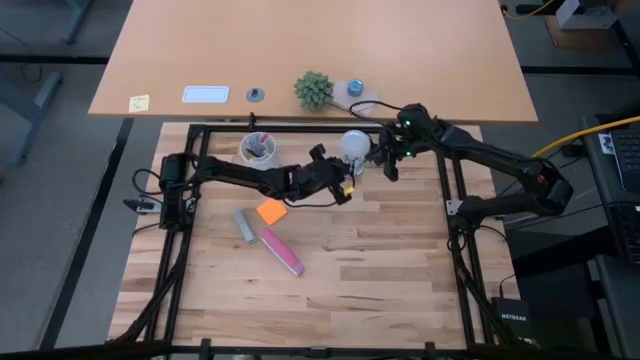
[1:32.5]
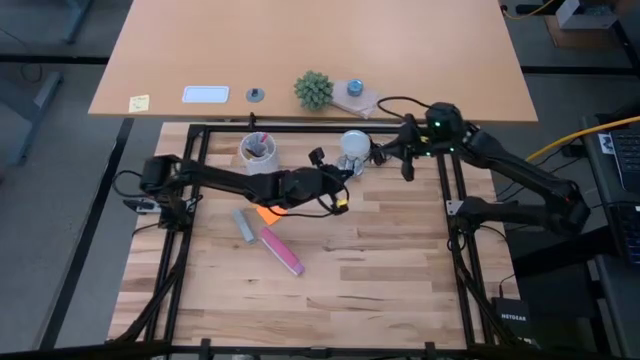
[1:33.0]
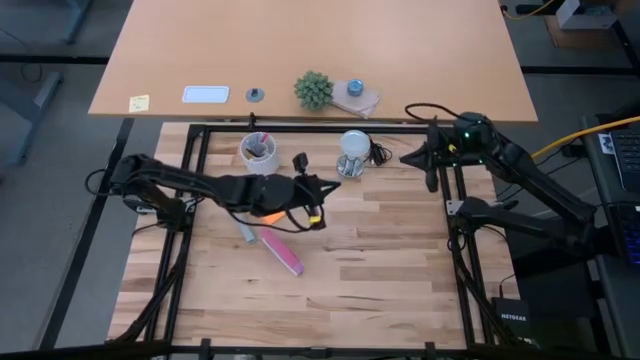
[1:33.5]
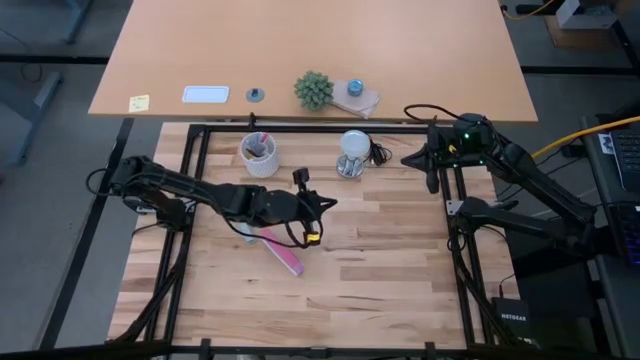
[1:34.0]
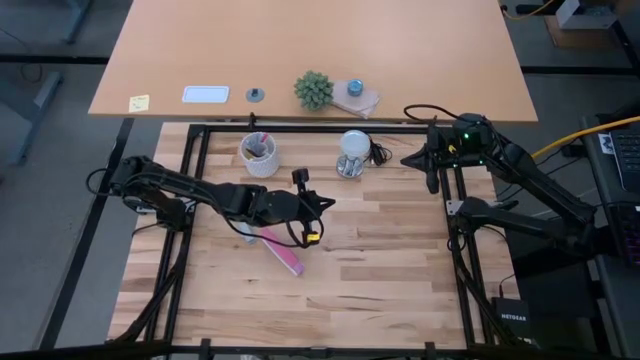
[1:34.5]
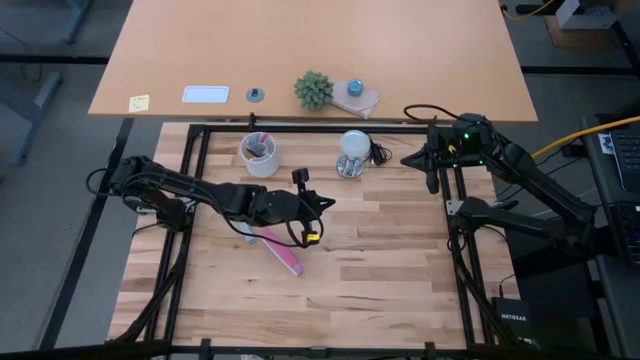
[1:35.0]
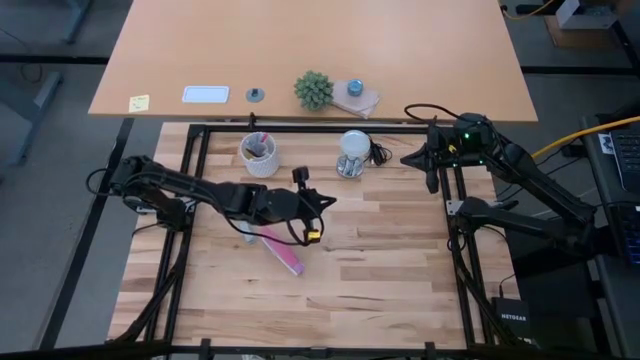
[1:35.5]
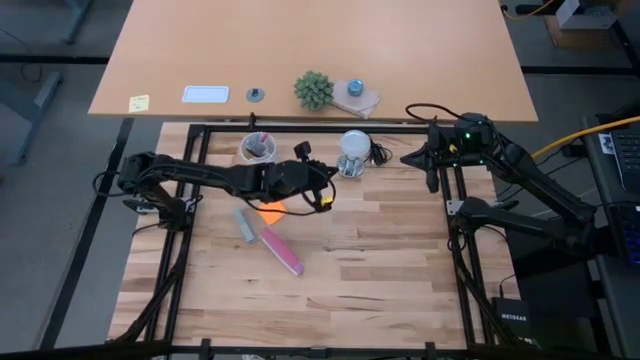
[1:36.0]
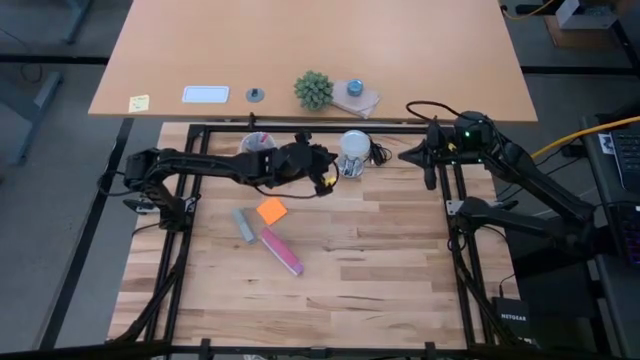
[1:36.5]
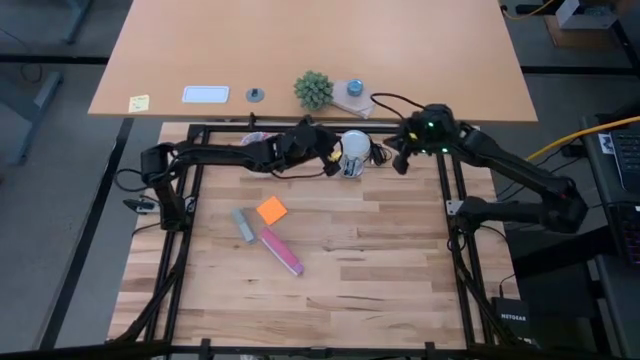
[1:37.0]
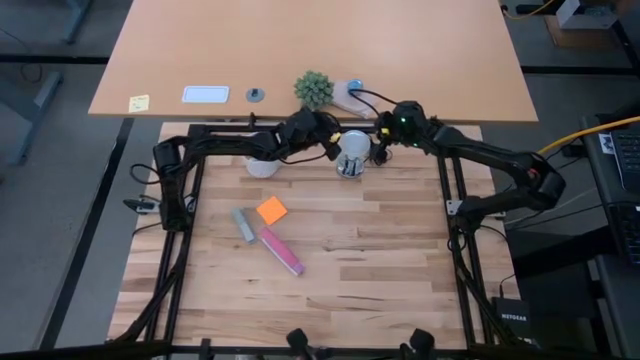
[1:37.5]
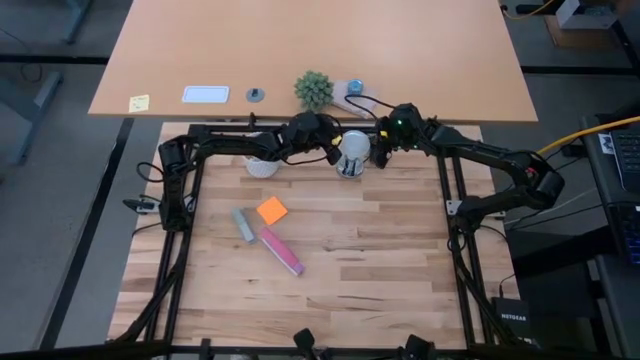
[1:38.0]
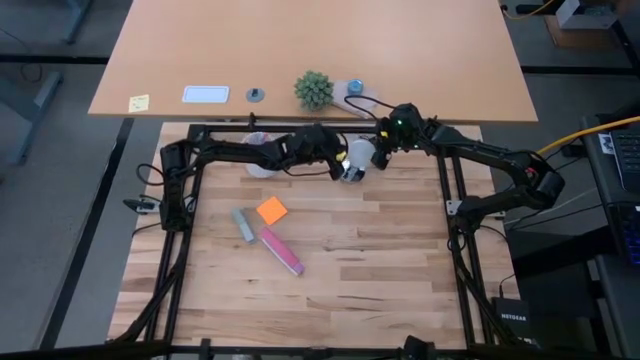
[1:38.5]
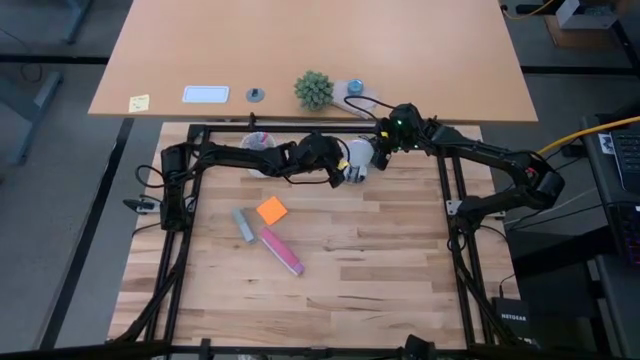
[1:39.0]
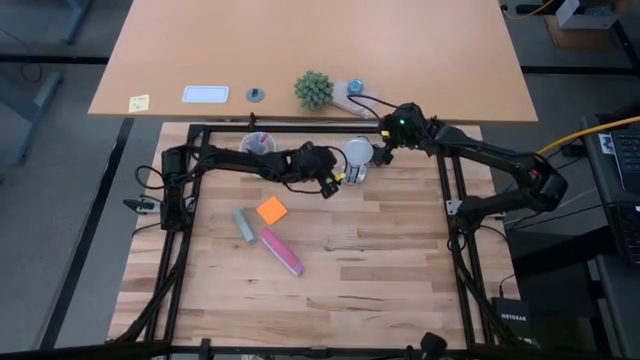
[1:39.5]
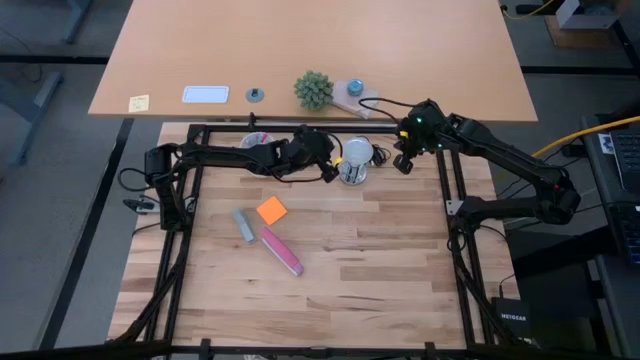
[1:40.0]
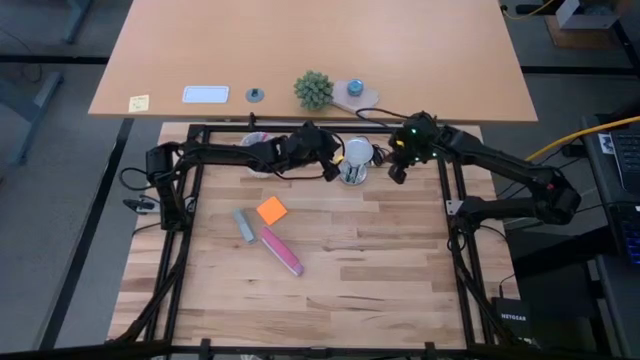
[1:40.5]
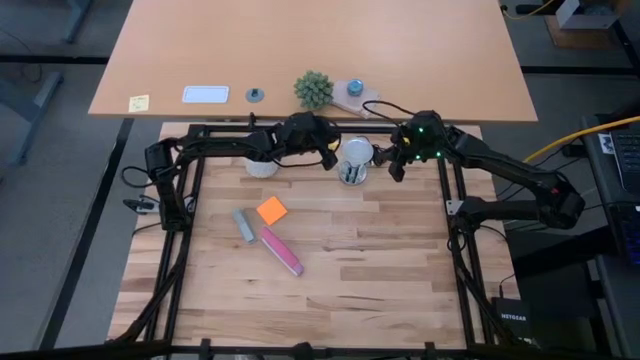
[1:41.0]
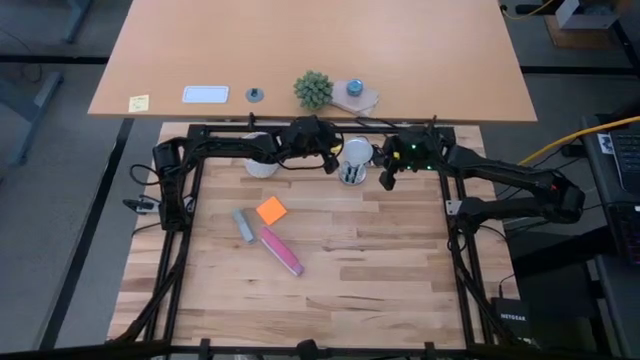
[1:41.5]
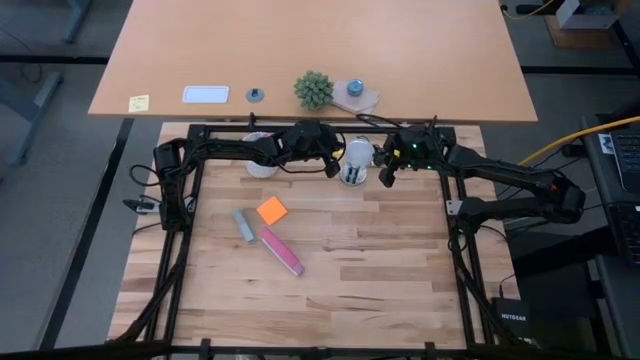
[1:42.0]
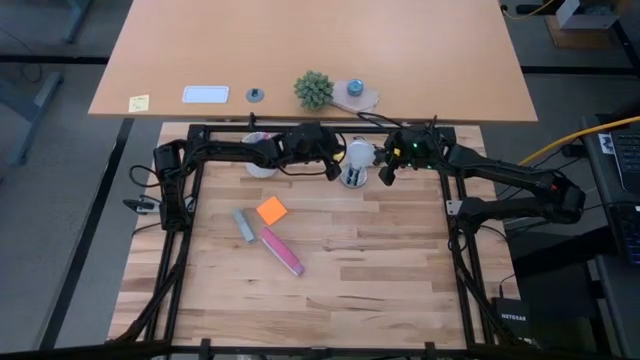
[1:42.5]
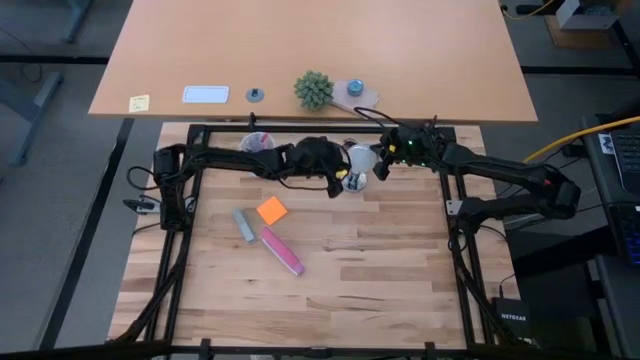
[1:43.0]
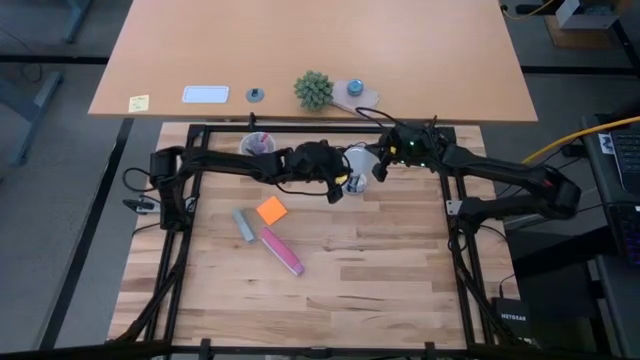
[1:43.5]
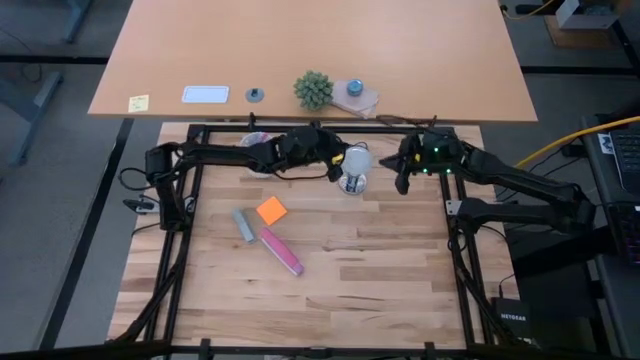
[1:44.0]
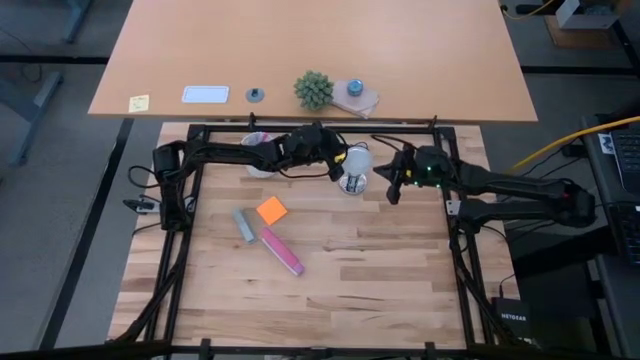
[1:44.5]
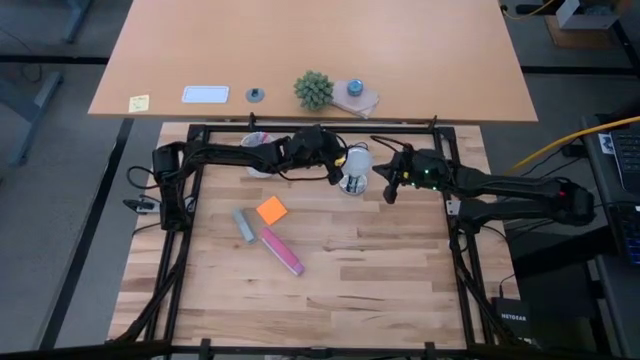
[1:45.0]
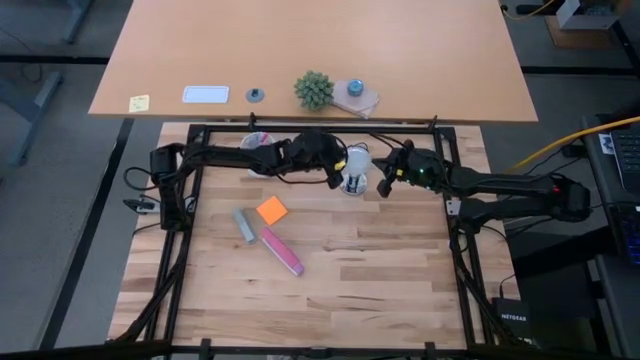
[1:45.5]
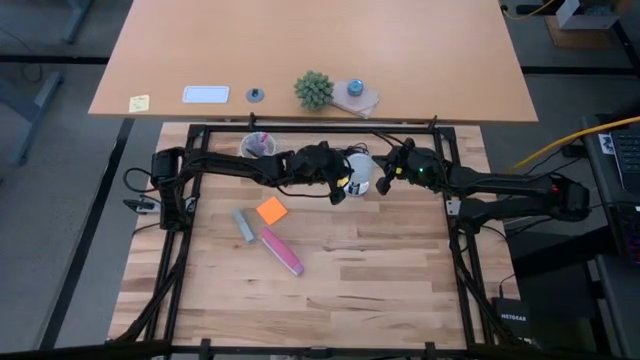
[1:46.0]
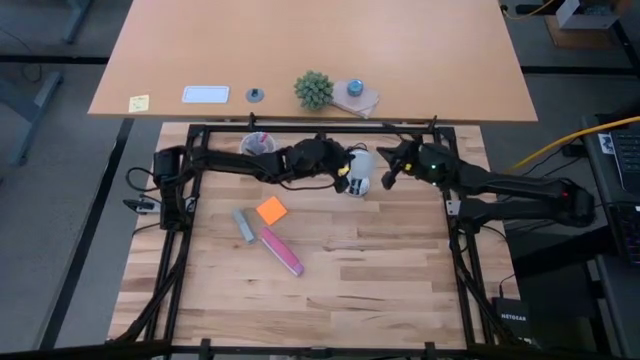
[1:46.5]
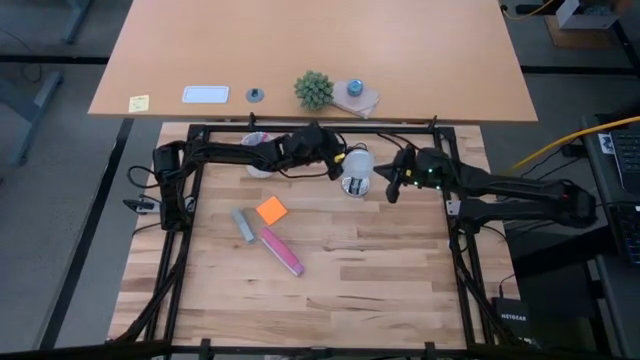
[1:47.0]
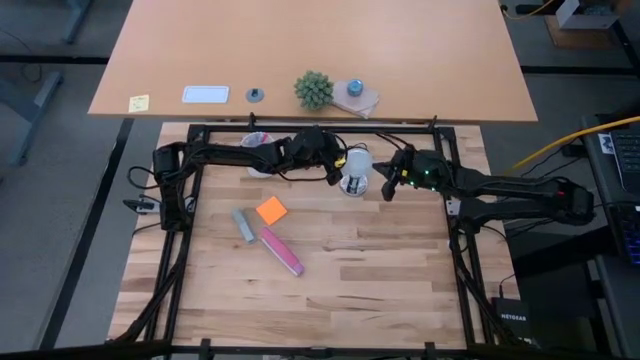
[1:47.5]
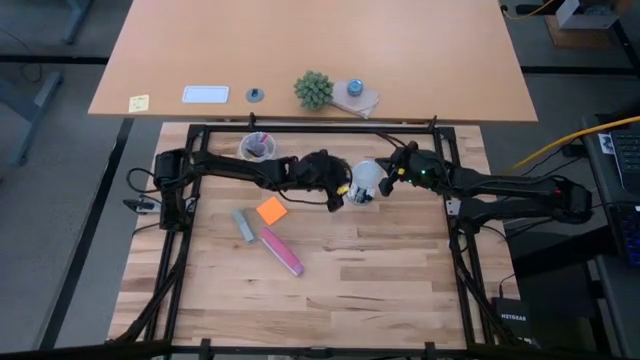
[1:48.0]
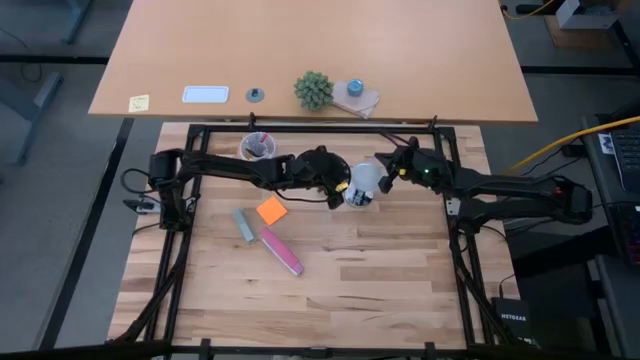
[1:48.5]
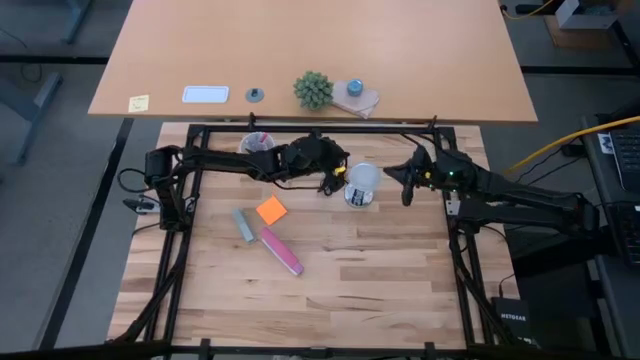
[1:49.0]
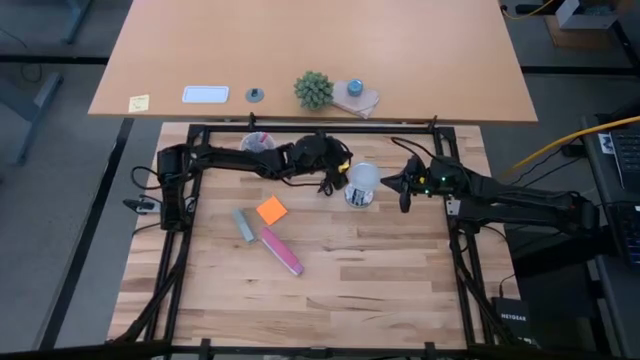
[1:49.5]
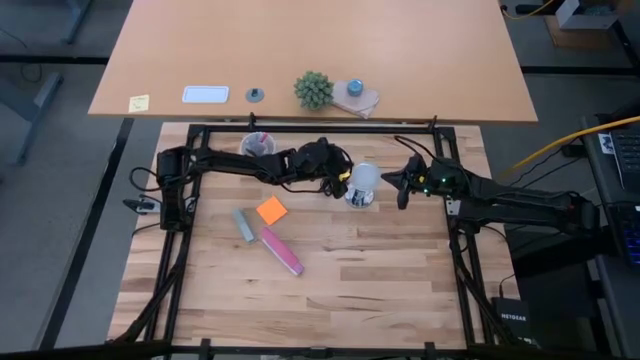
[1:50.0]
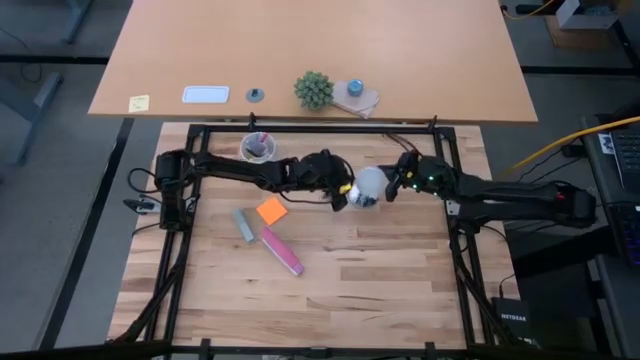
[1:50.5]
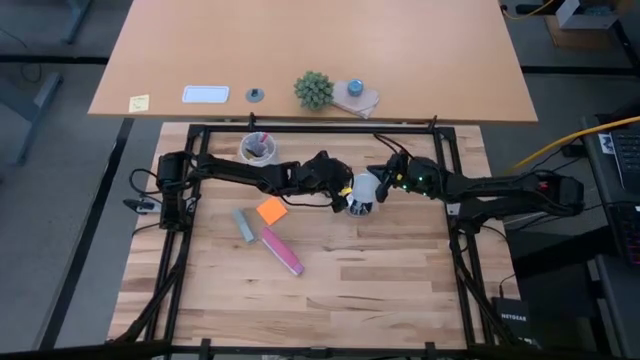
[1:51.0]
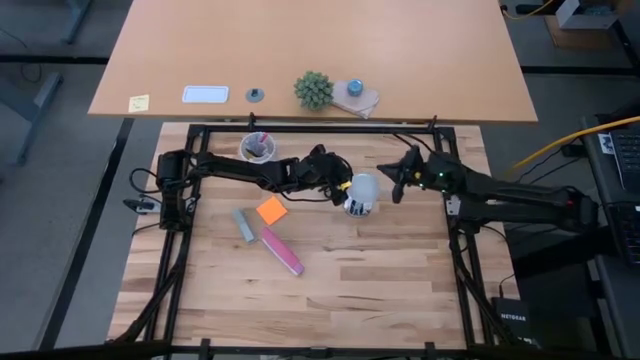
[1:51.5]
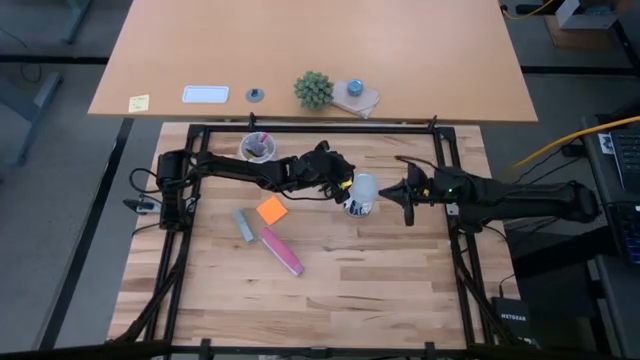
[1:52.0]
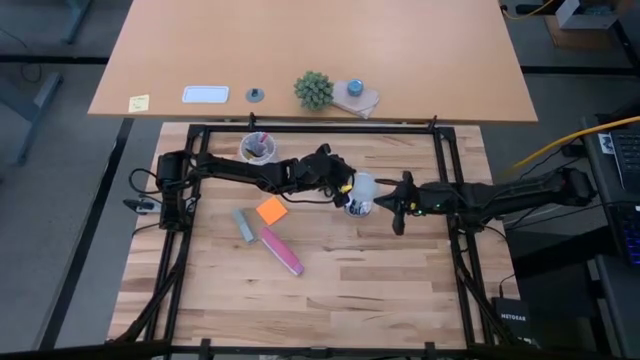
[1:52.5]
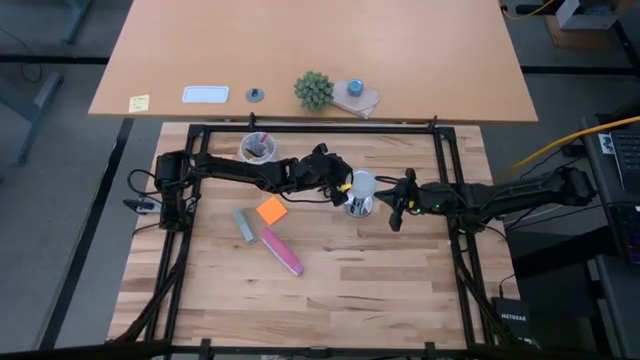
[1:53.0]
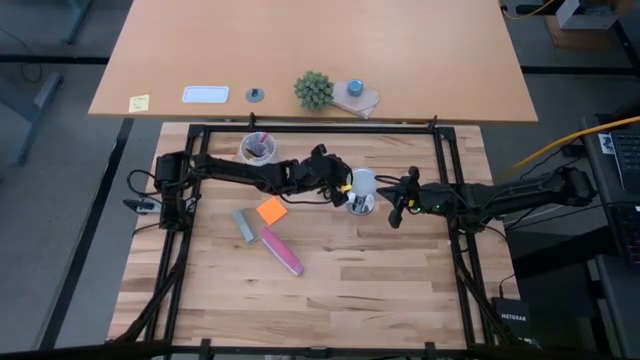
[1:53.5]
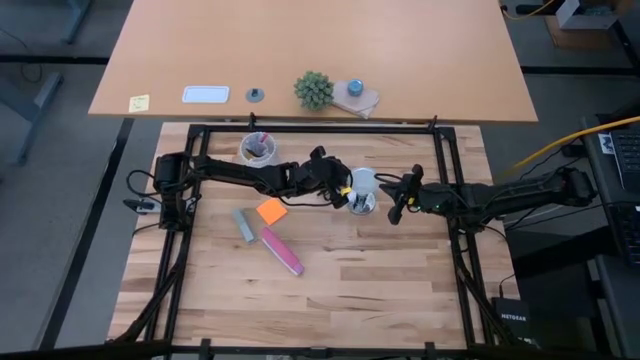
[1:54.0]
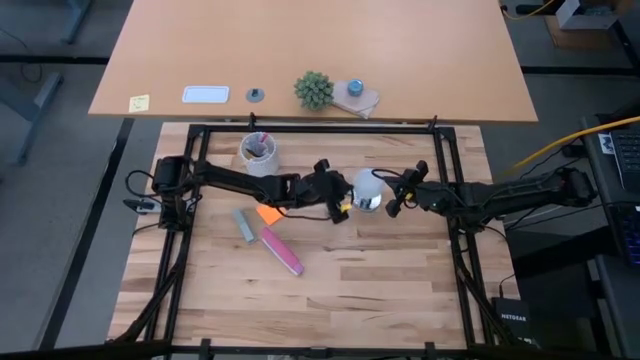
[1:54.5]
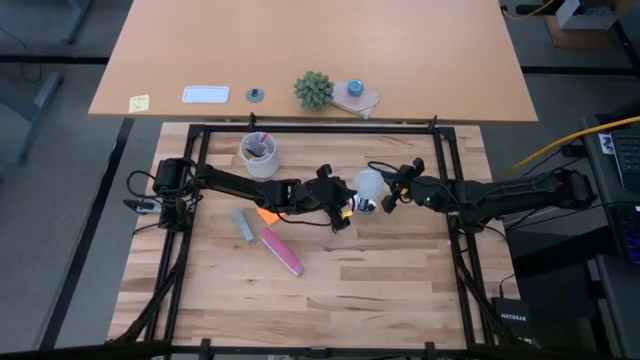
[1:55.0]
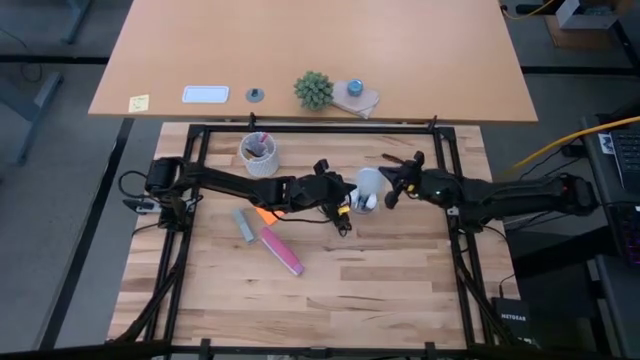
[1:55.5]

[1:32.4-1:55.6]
Task: Screw lightbulb
Remove the lightbulb from the lamp
